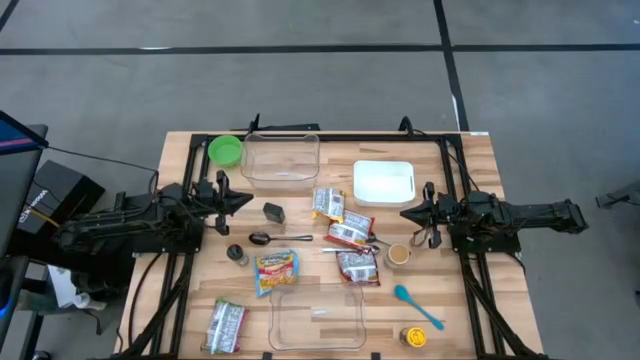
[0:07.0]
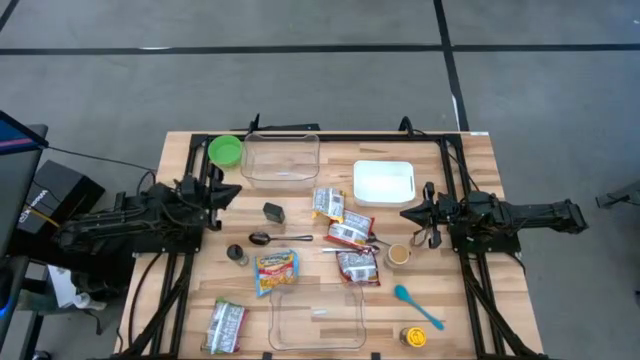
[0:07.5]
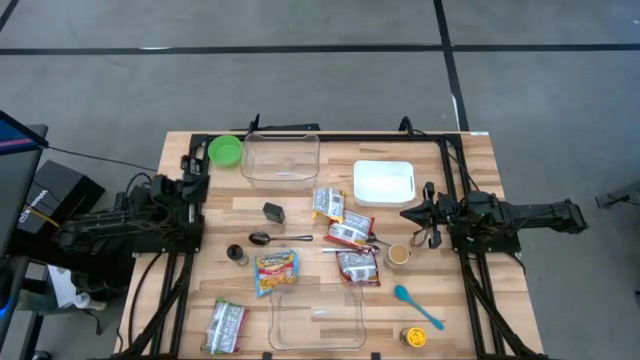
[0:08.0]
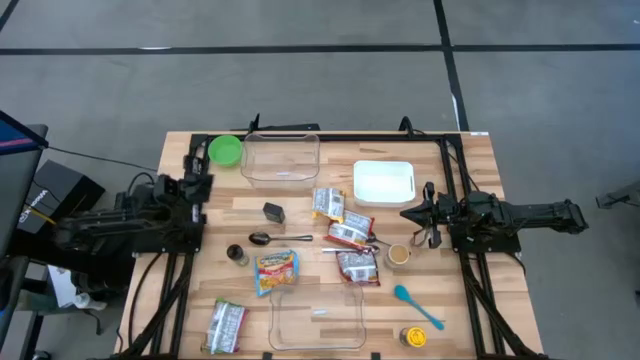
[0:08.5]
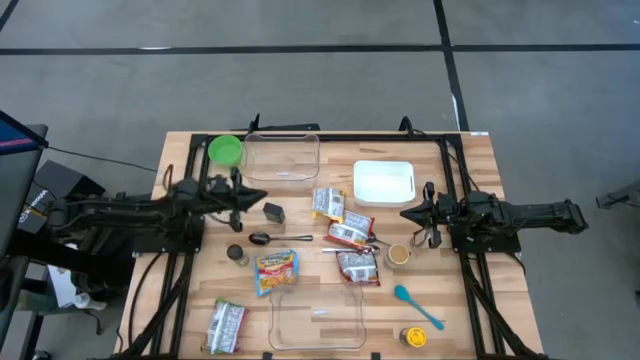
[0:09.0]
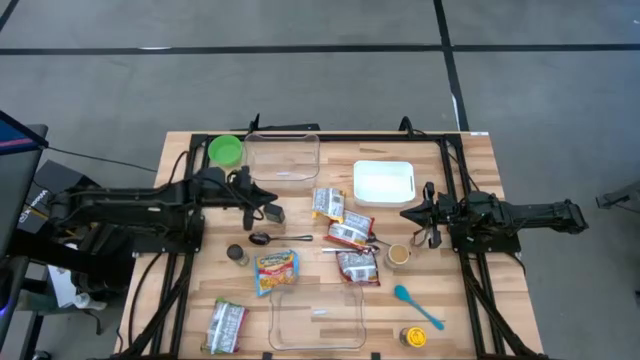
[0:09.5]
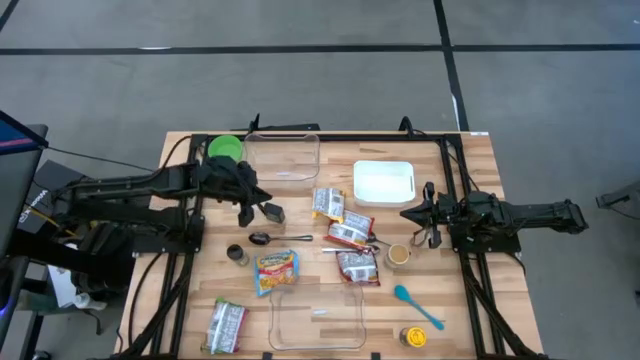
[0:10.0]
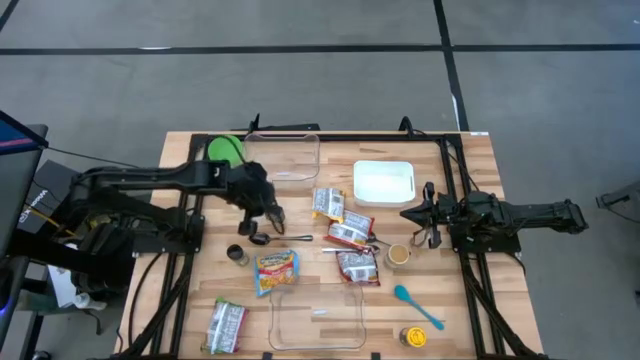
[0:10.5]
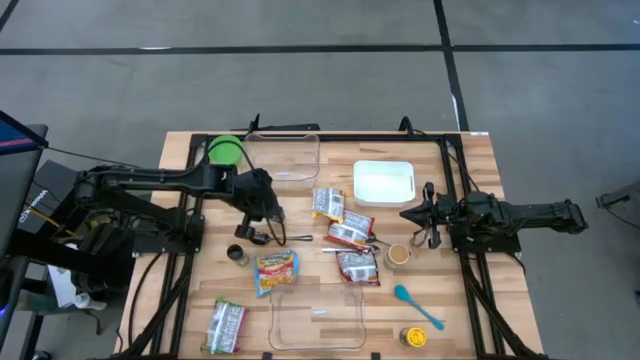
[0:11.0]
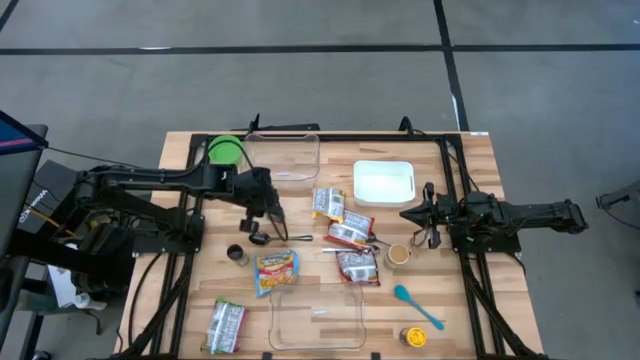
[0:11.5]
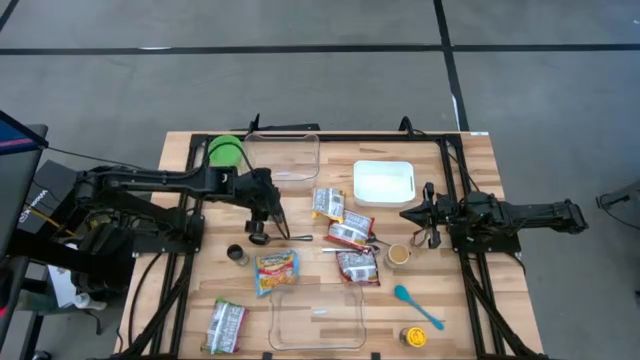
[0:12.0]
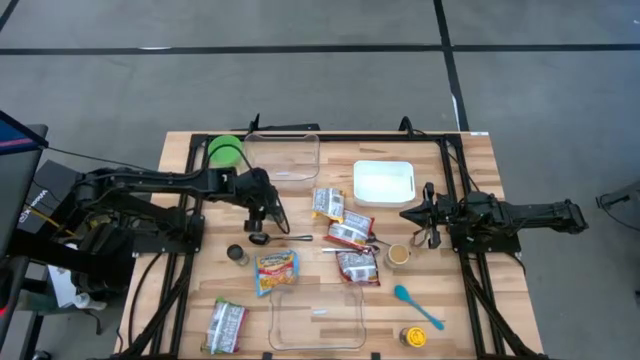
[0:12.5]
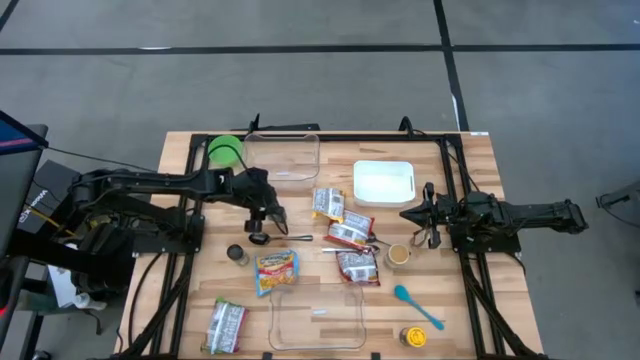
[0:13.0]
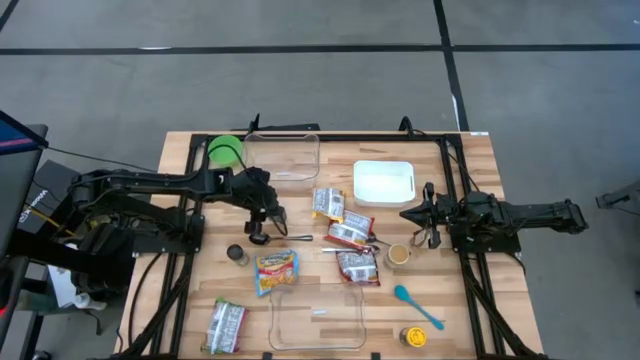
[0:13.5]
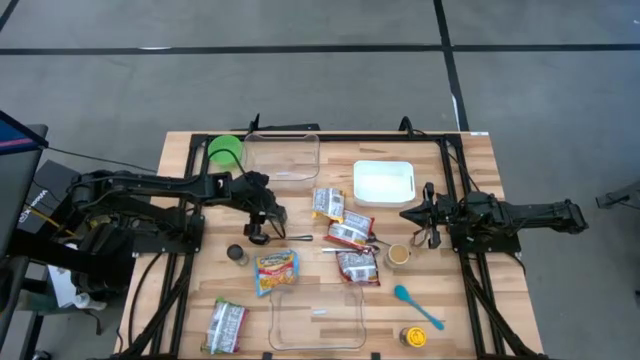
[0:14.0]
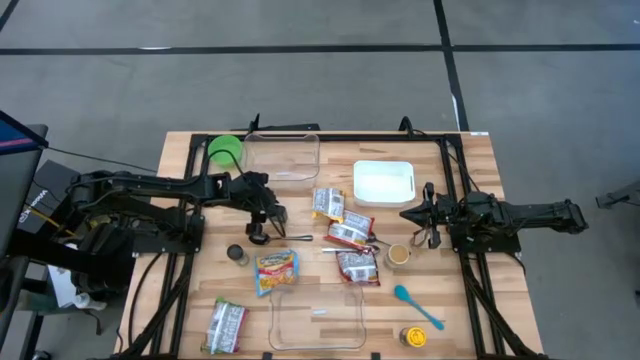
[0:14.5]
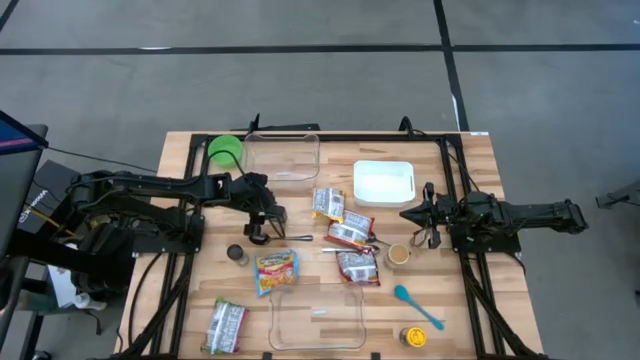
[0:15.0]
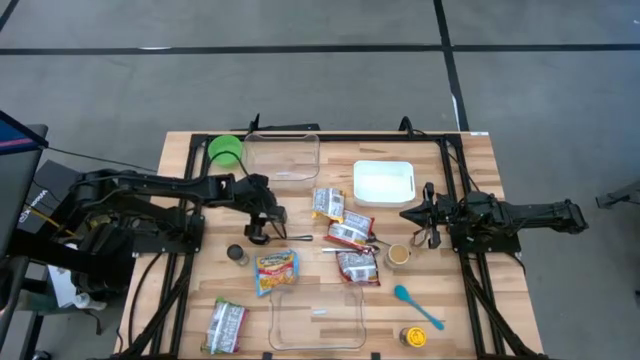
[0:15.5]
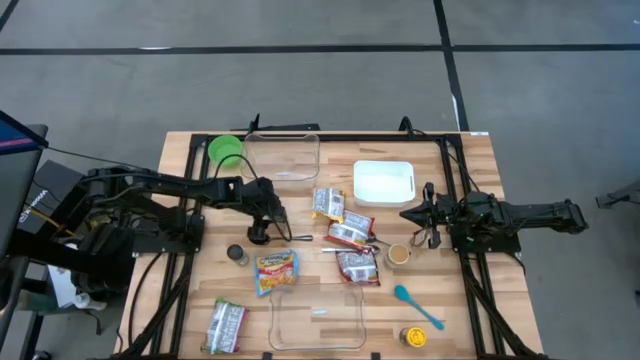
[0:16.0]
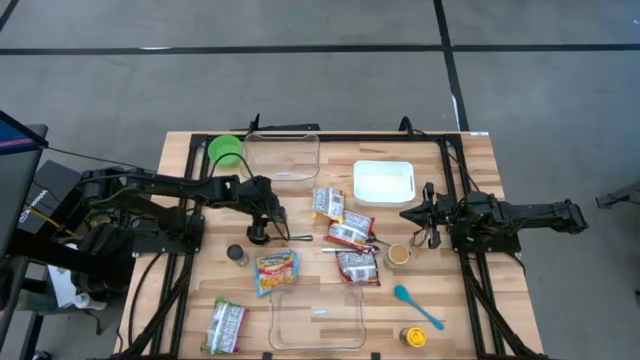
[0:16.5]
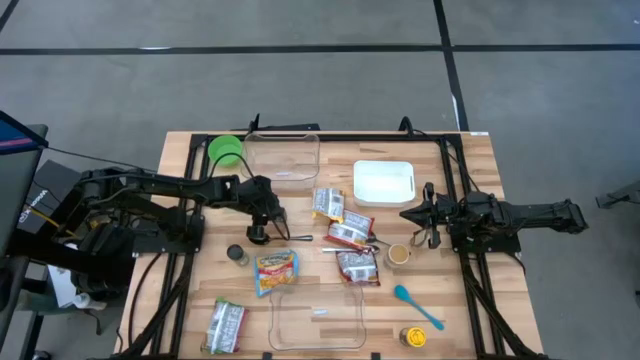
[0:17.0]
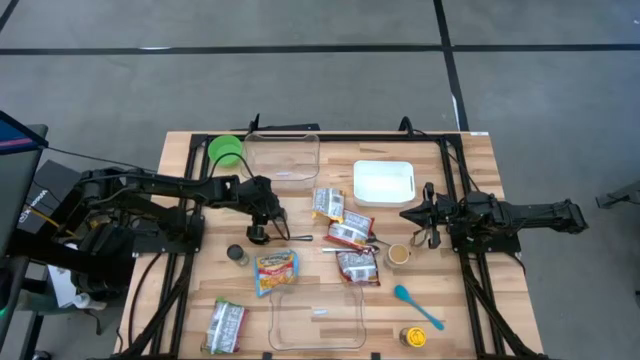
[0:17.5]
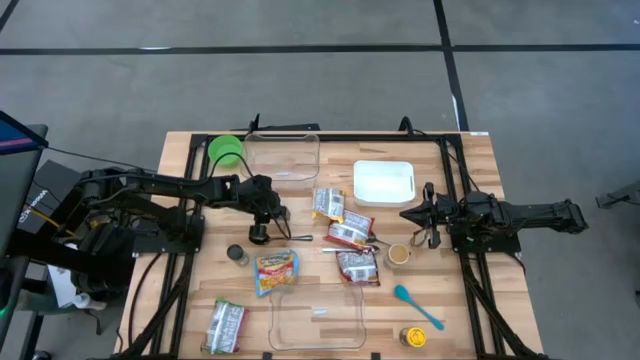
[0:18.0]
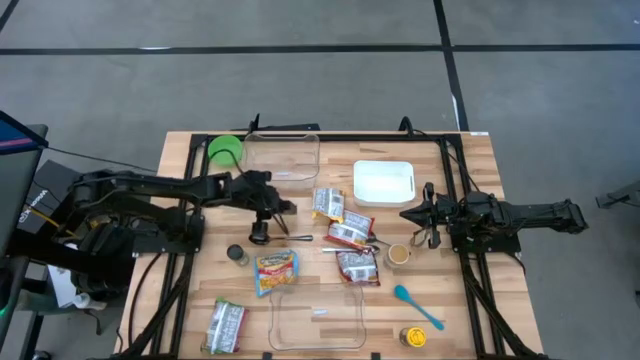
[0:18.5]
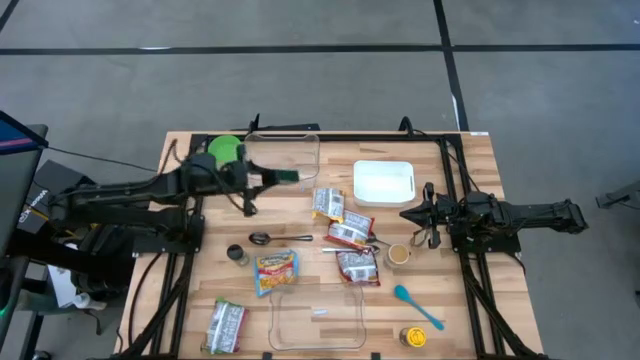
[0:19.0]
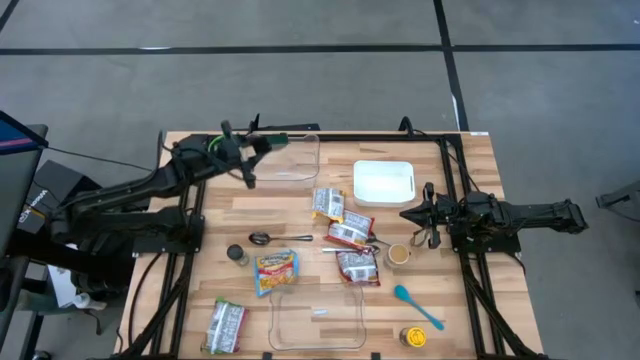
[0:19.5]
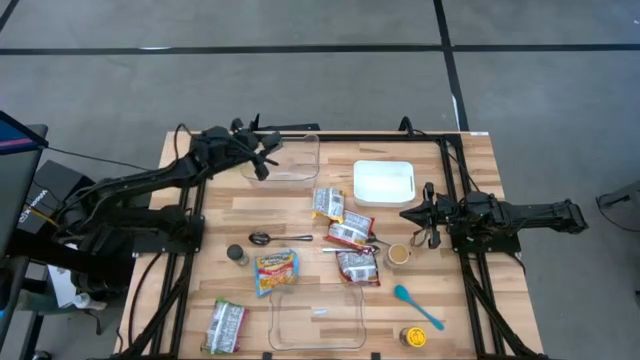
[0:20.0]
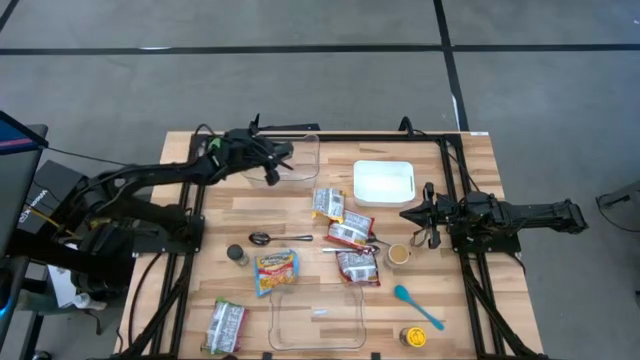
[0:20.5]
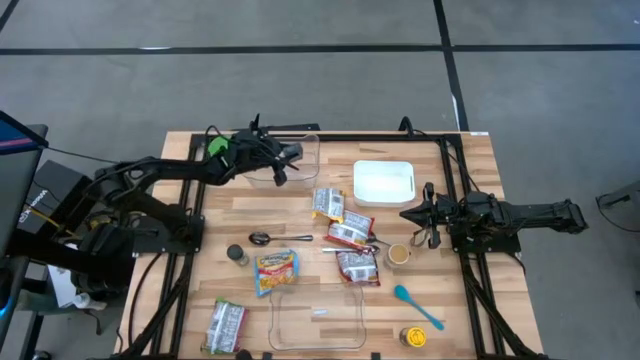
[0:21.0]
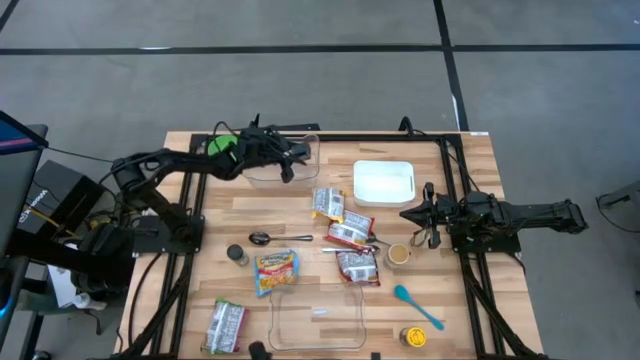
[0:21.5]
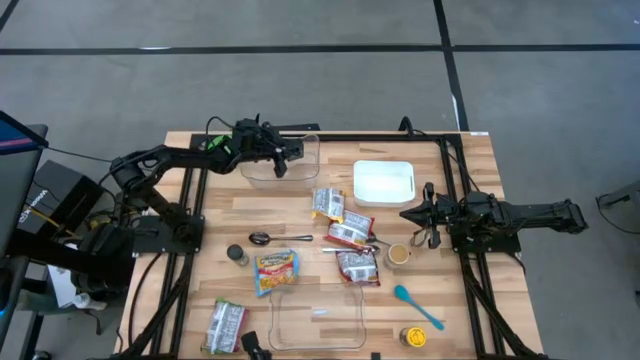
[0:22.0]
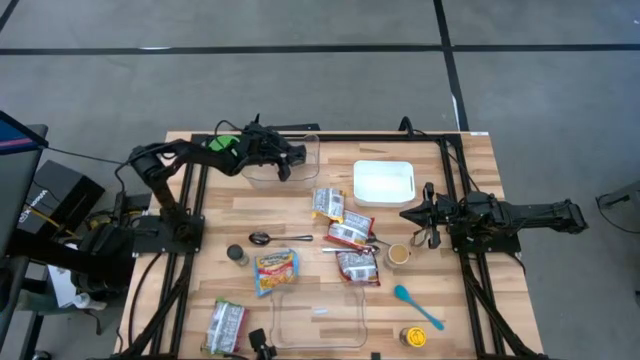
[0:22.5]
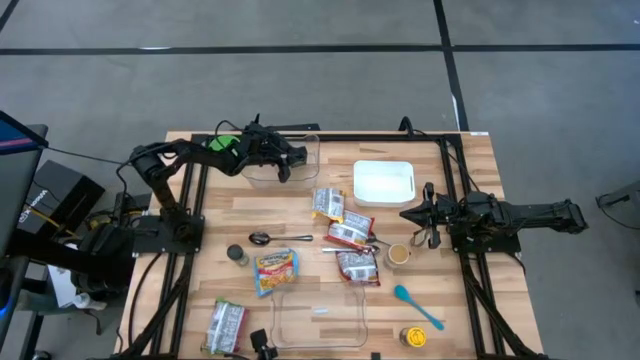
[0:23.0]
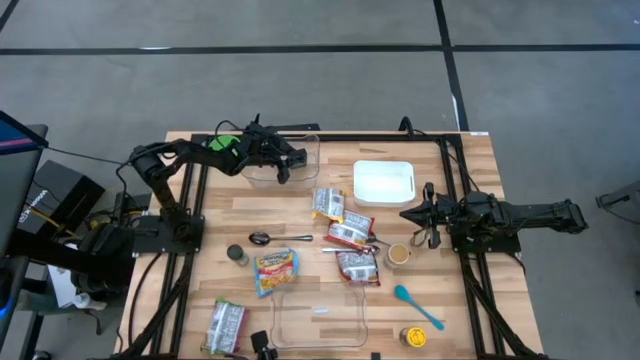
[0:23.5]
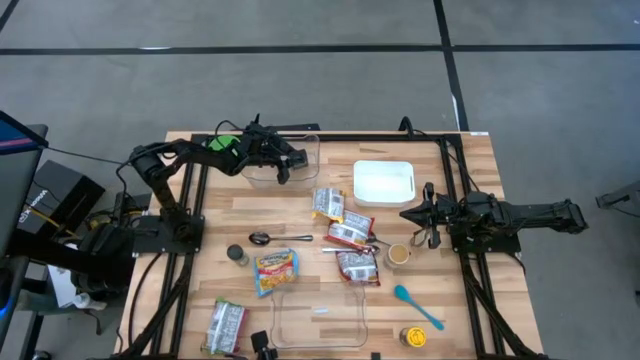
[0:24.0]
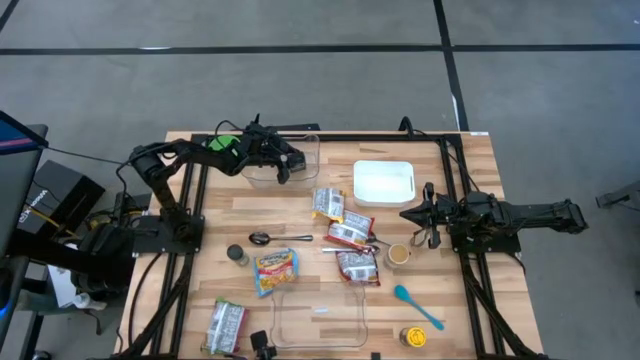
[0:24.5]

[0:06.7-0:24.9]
Task: Pick & Place Food Item
Put the black seasoning can into the top transparent bin

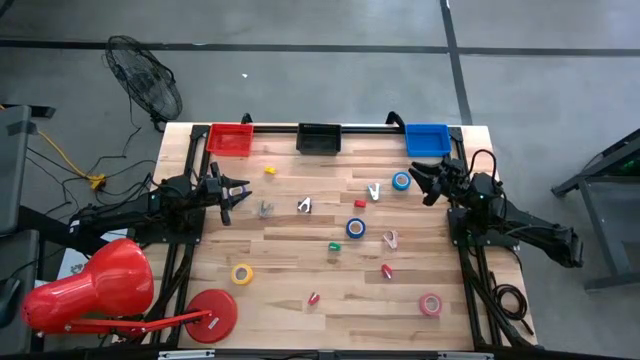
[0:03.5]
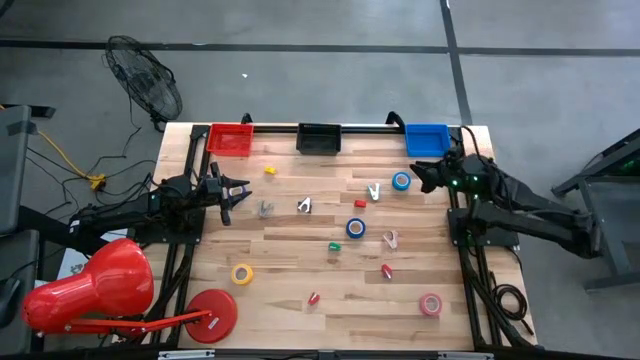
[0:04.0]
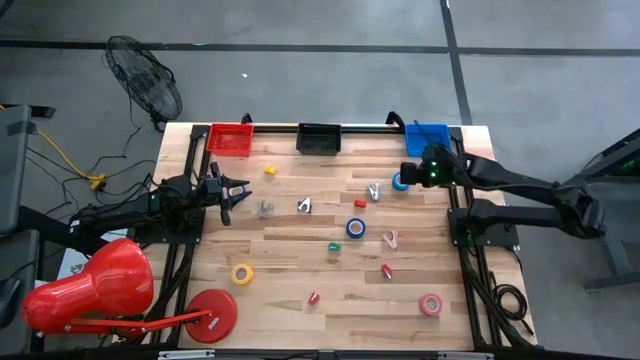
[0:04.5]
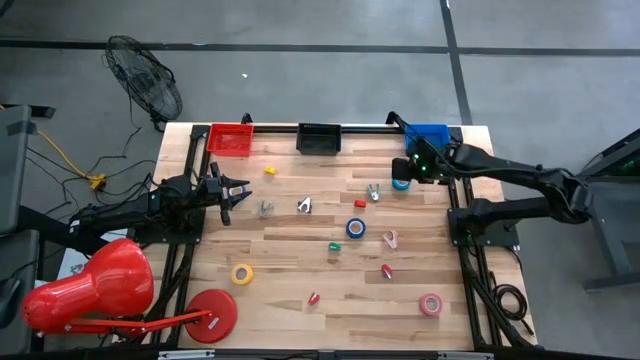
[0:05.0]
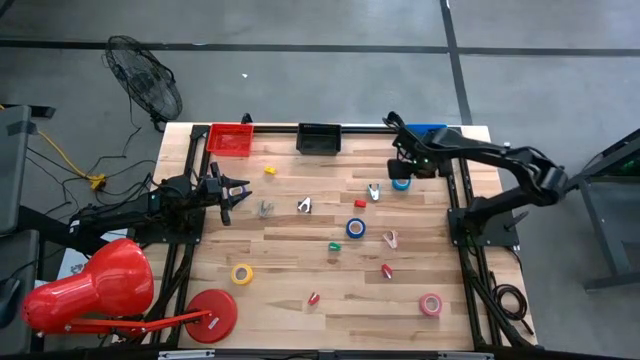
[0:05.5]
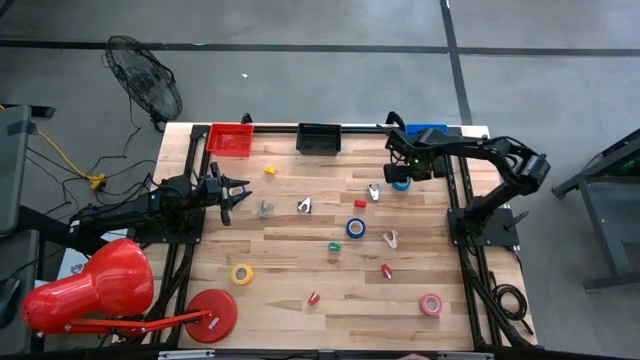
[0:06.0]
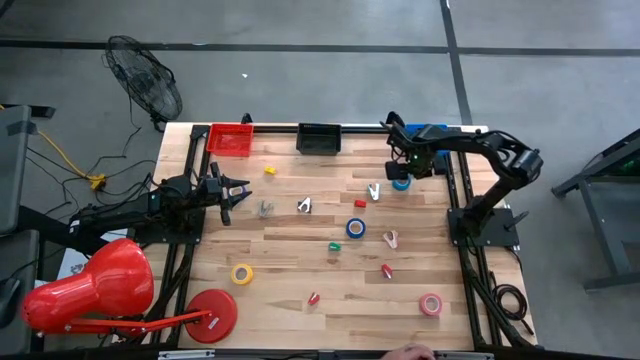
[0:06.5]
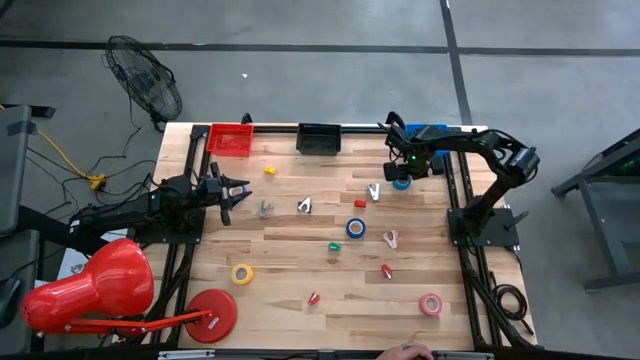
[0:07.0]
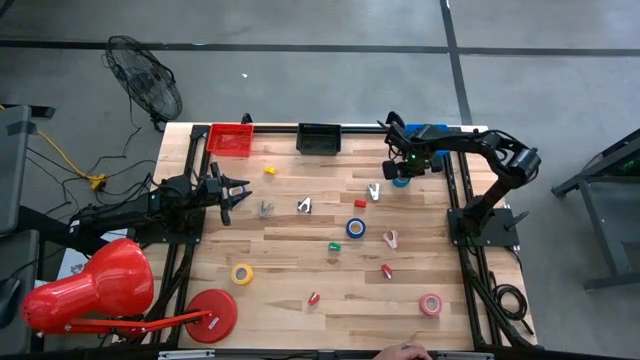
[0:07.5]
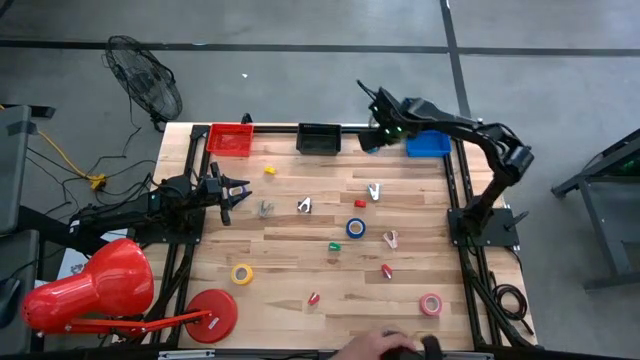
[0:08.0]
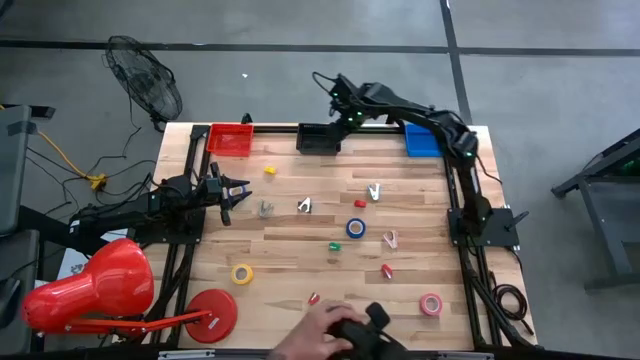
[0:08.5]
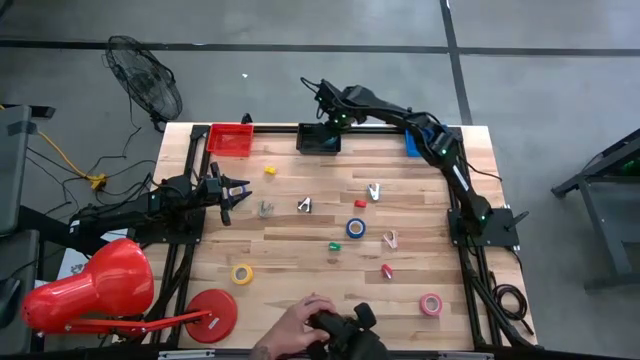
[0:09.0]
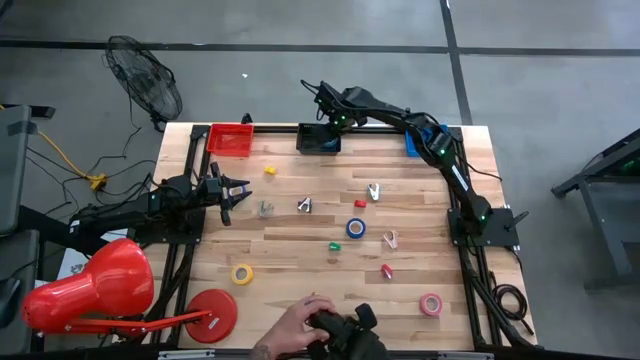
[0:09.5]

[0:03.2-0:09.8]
Task: Pick and place Stapler, Stapler remover, tape
Put the light blue tape into the black bin
